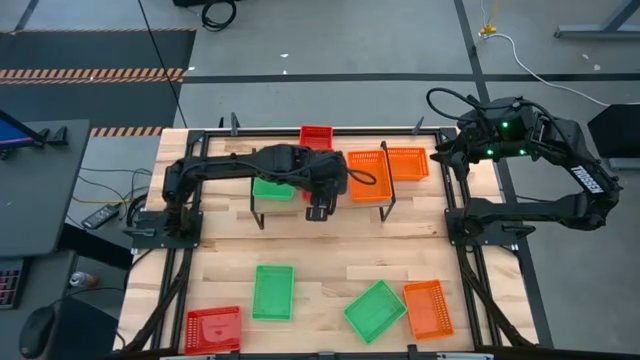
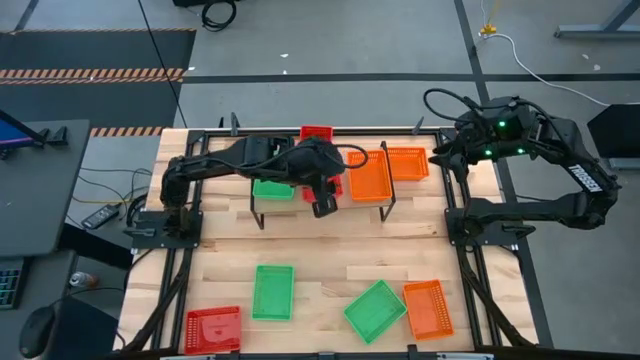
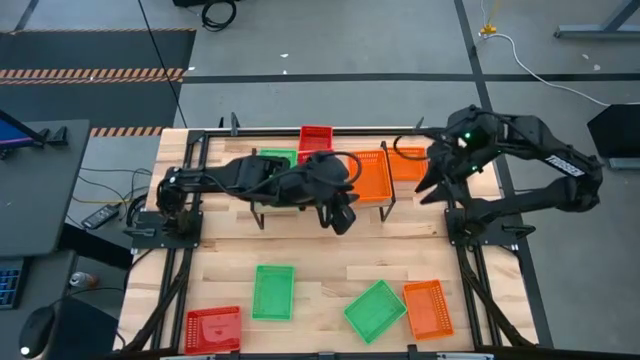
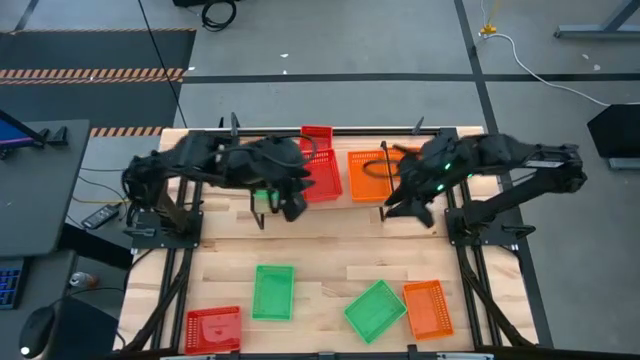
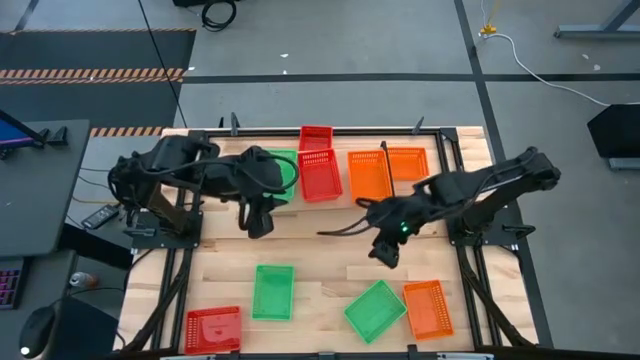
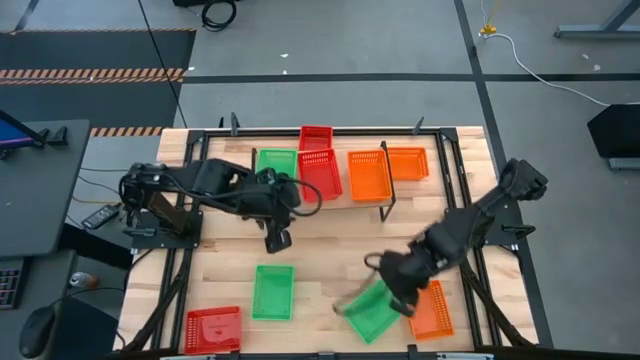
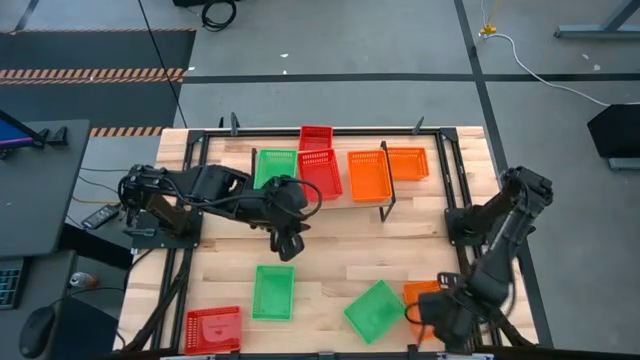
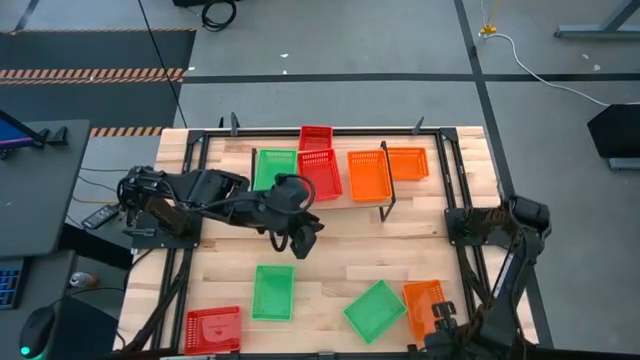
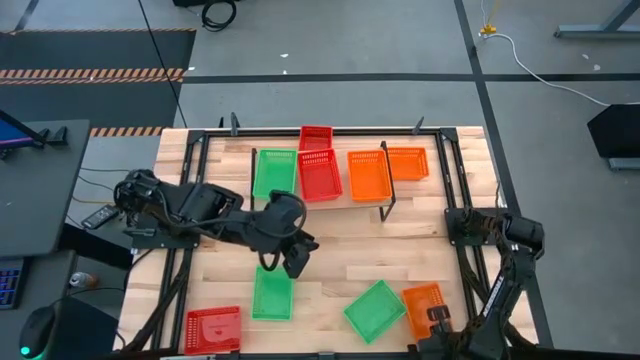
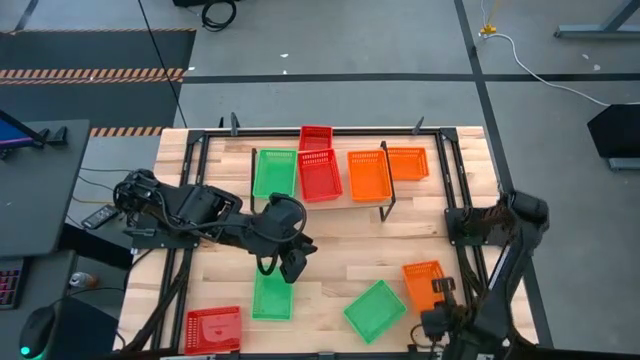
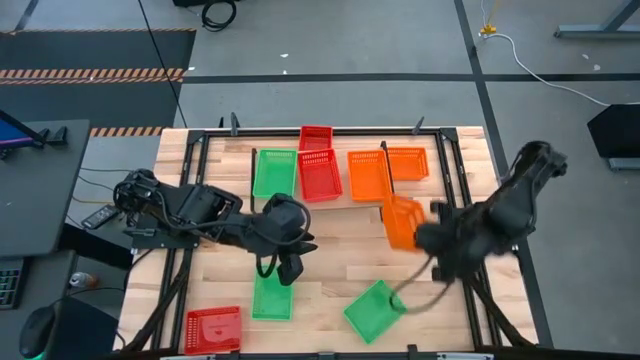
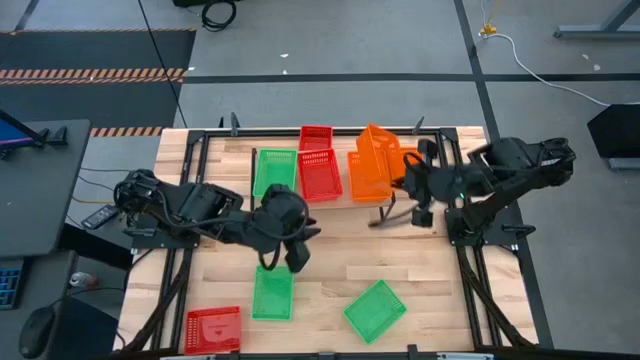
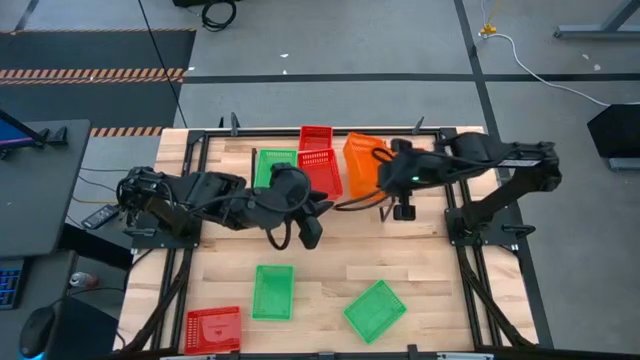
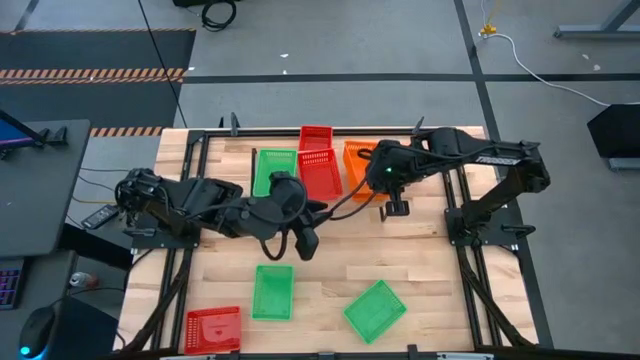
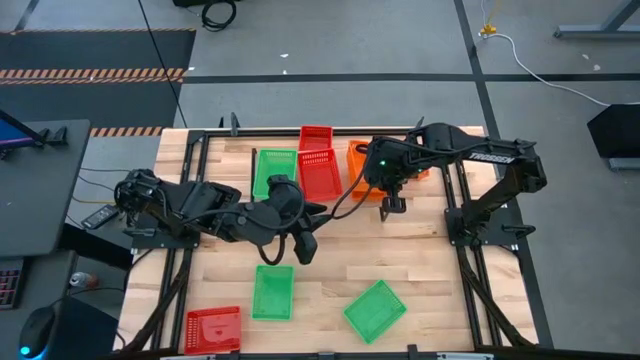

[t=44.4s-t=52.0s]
Task: Stack baskets on shelf by color
Stack the bottom orange bin on top of the other orange bin on the shelf

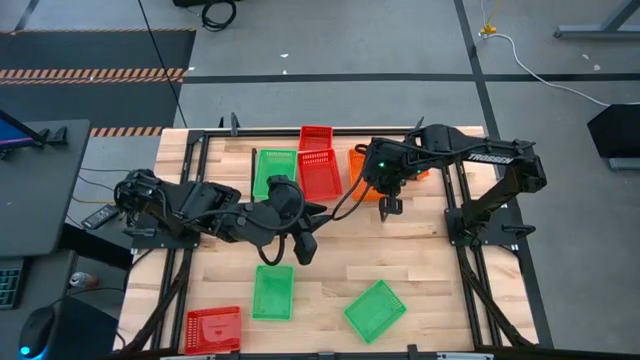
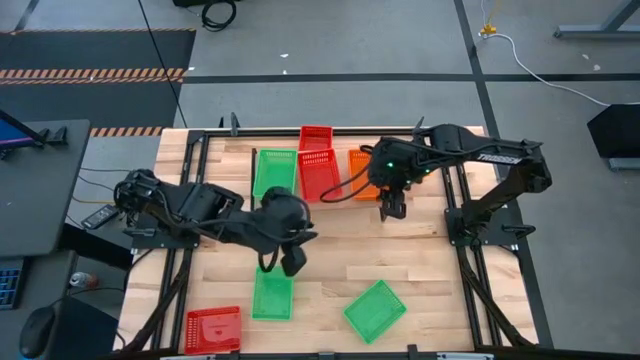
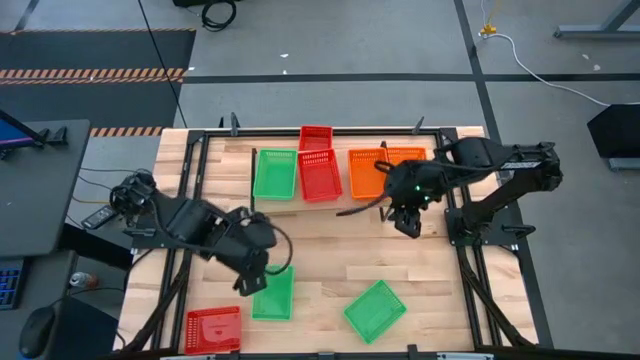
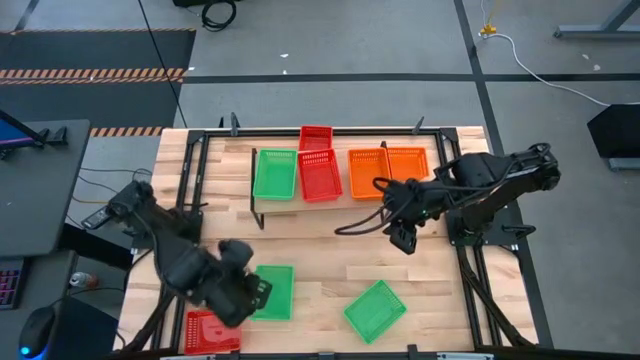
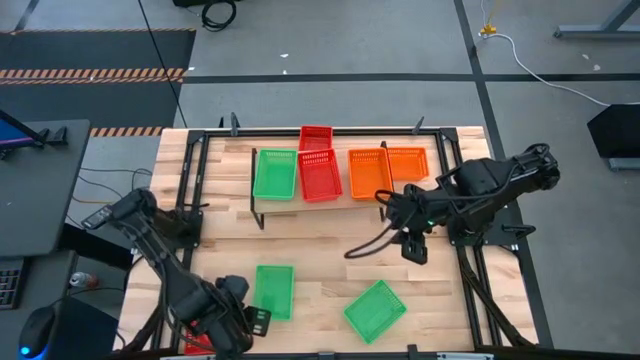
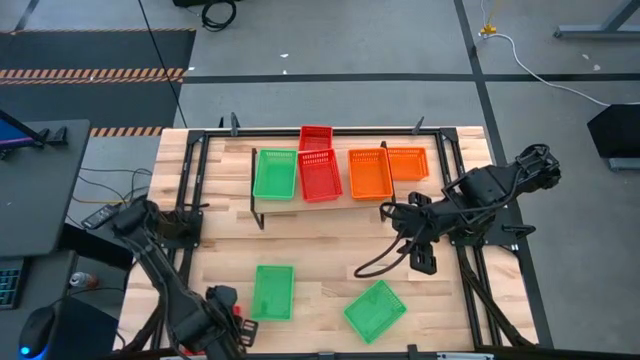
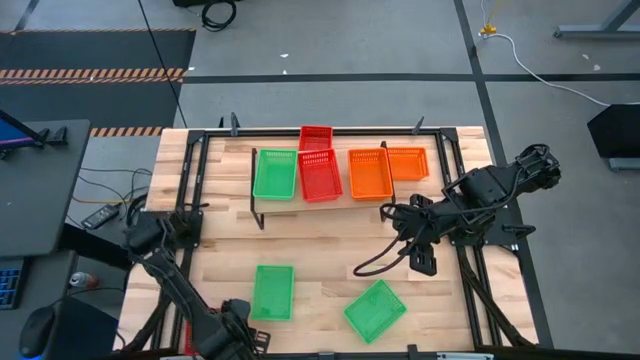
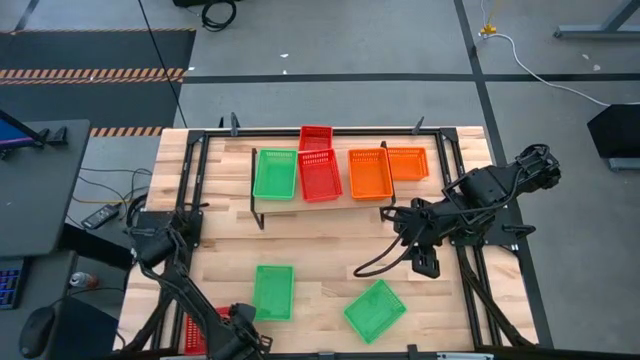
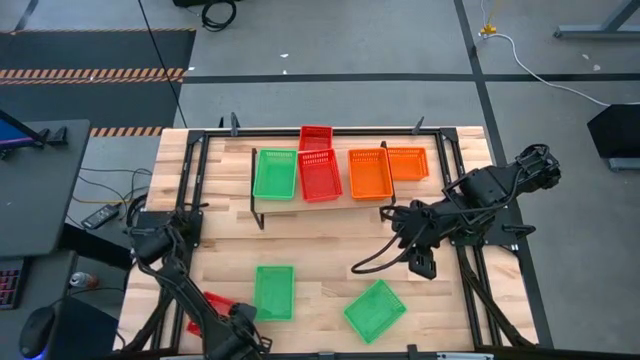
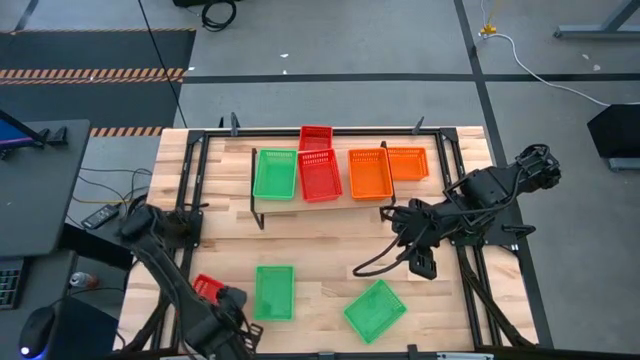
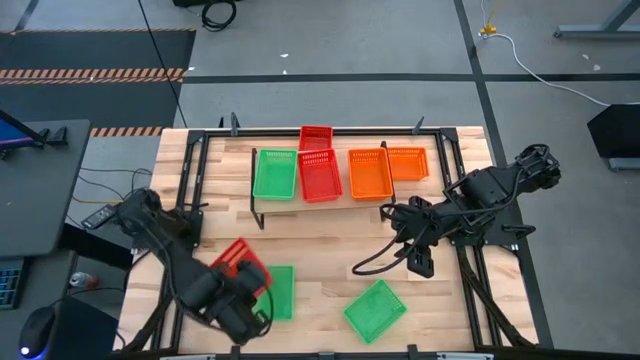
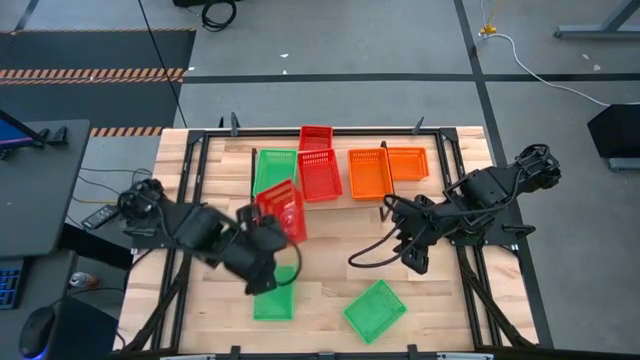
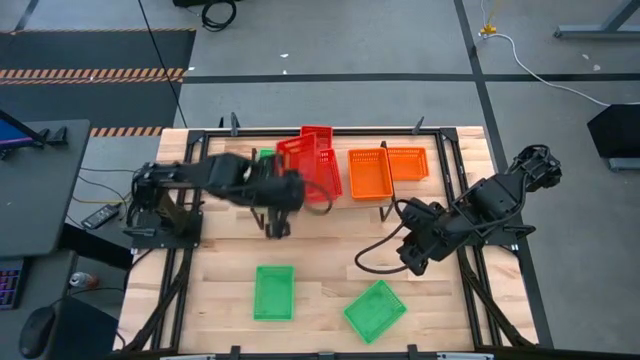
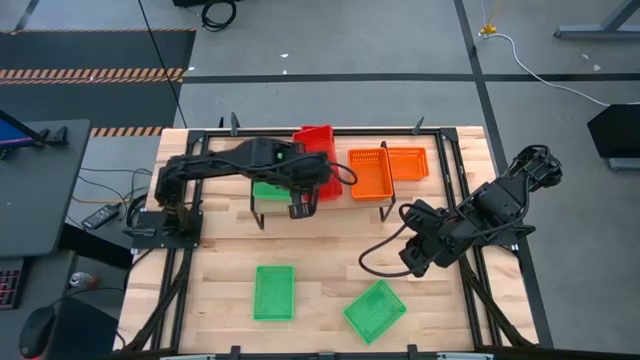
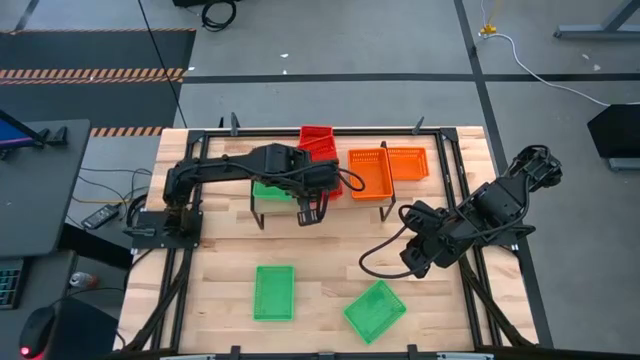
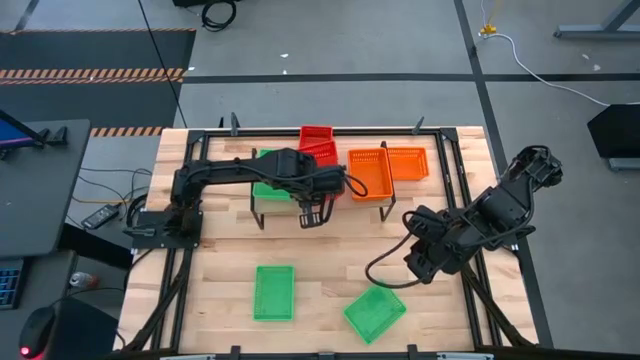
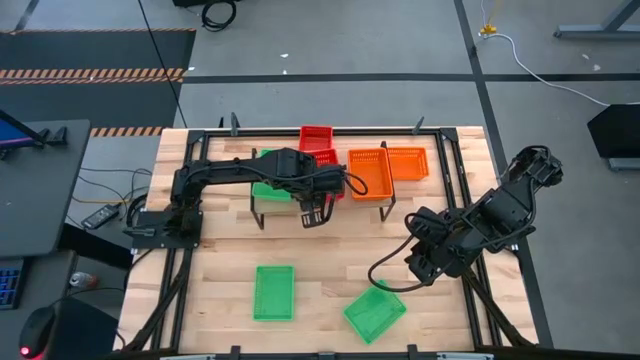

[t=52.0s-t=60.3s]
Stack the bottom red bin on top of the other red bin on the shelf

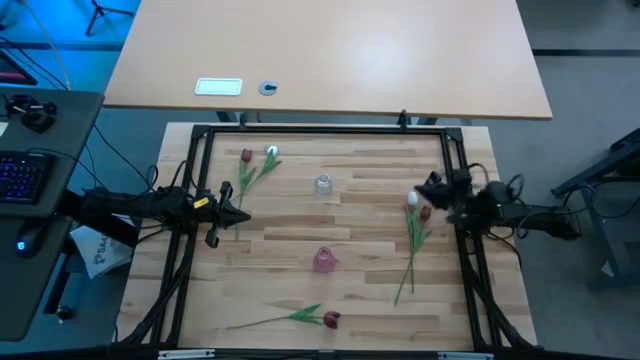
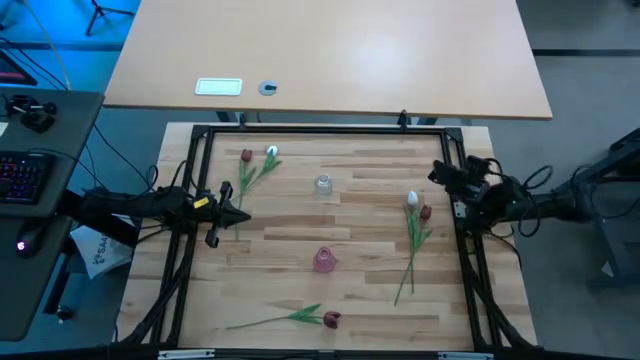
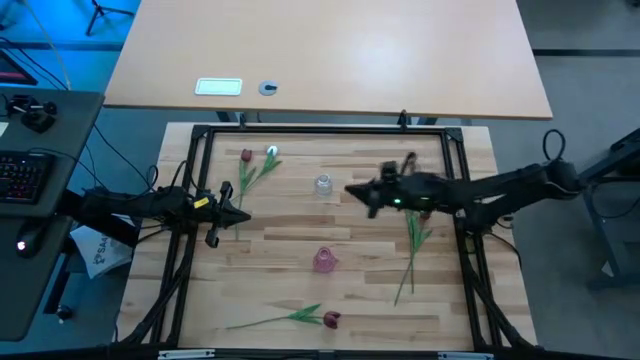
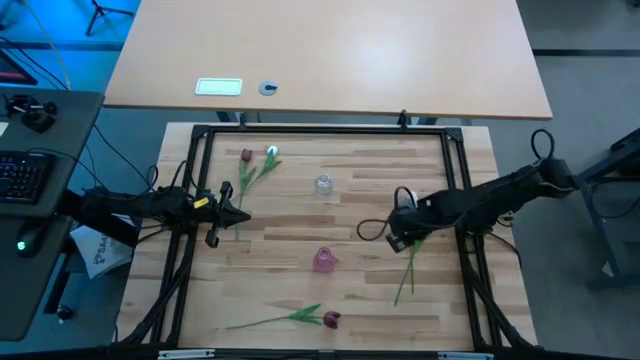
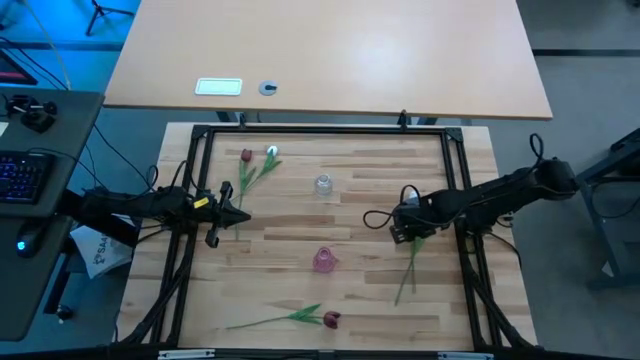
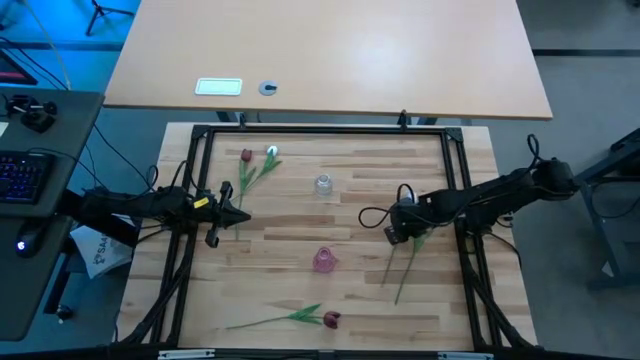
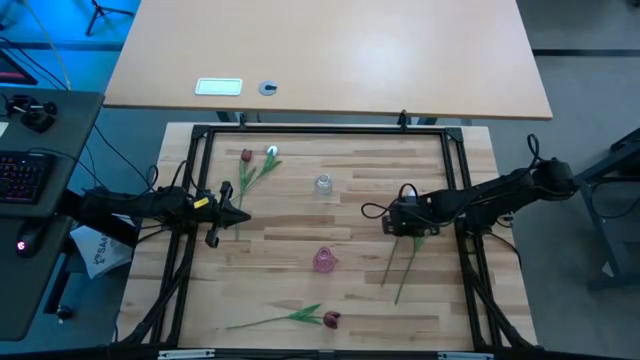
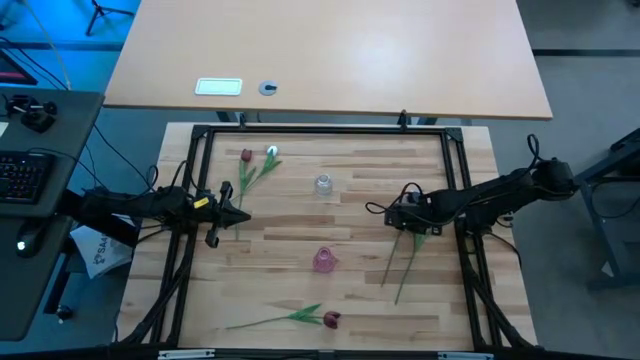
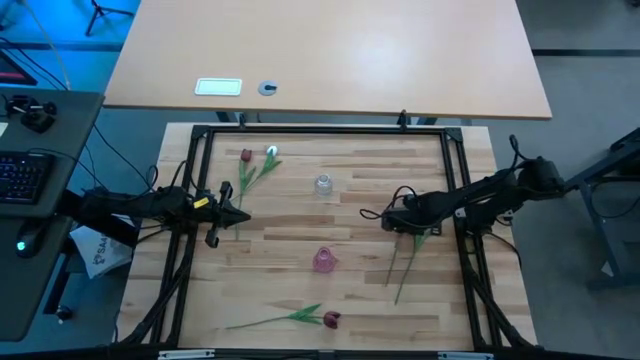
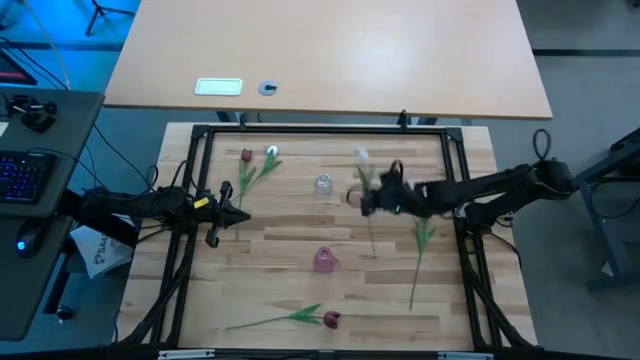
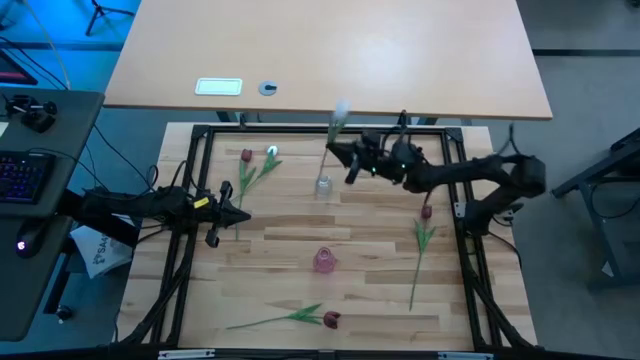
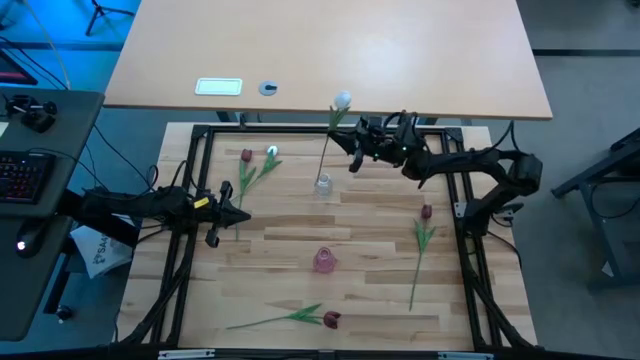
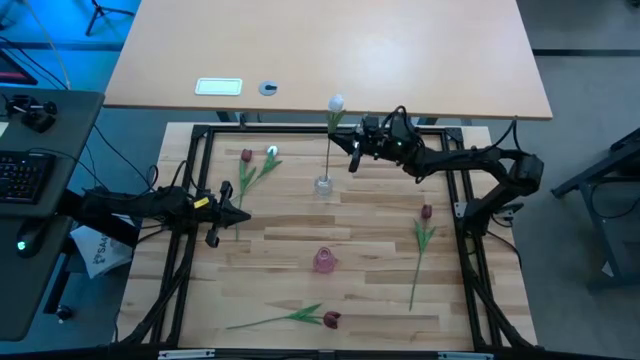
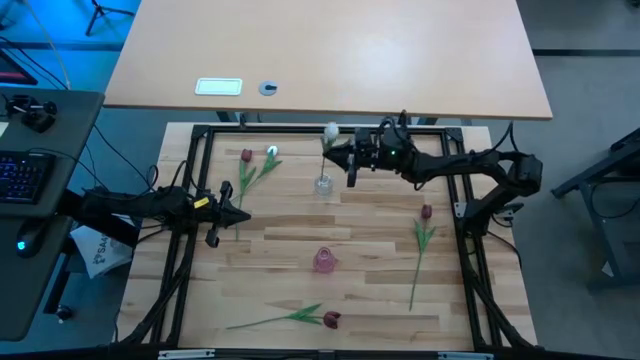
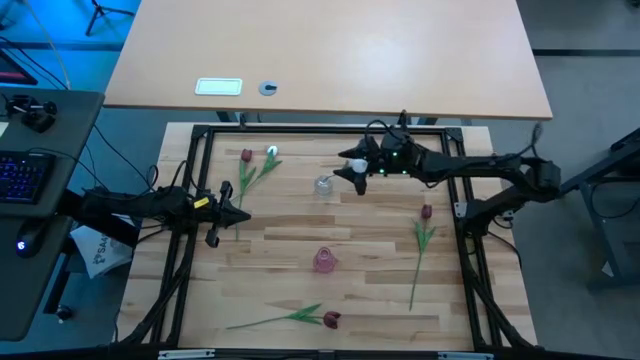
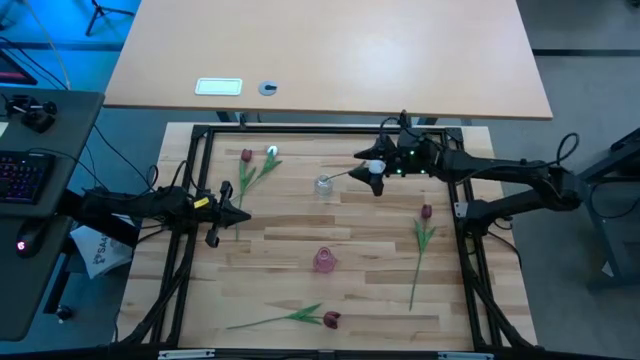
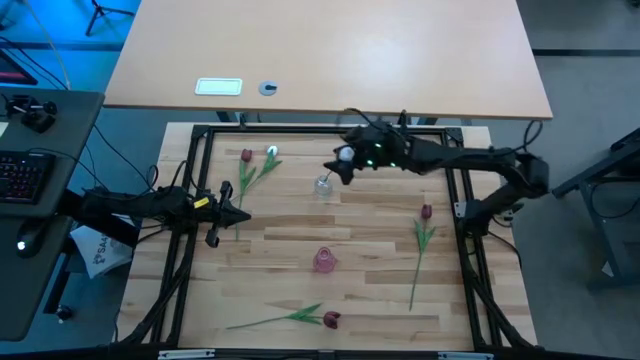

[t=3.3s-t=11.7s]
Task: Sort flowers into vase by color
Put the right white tulip into the transparent vase
